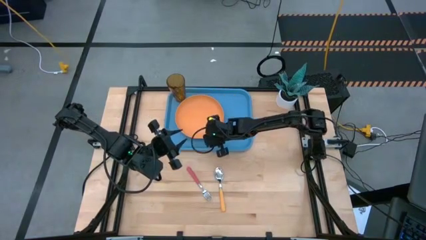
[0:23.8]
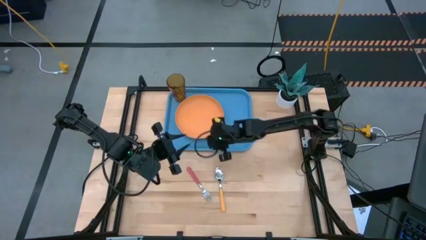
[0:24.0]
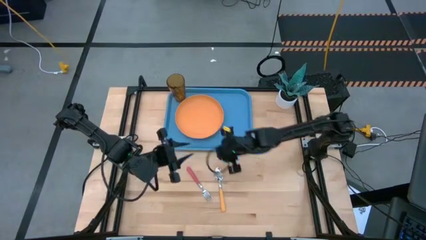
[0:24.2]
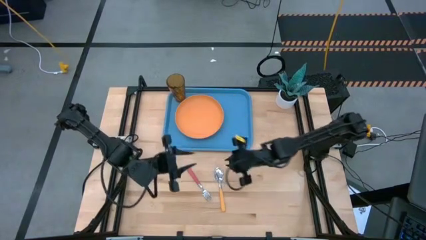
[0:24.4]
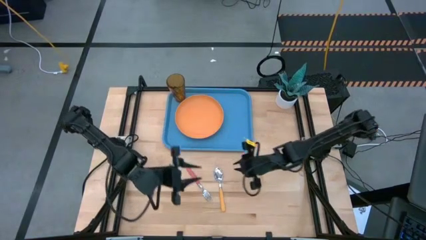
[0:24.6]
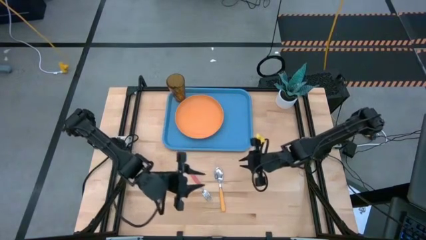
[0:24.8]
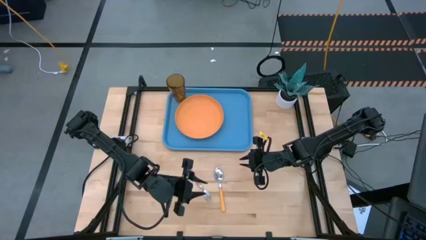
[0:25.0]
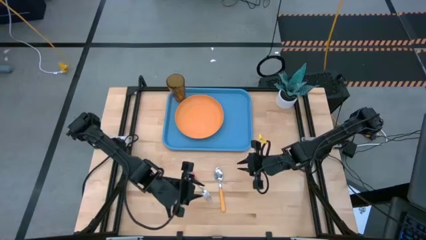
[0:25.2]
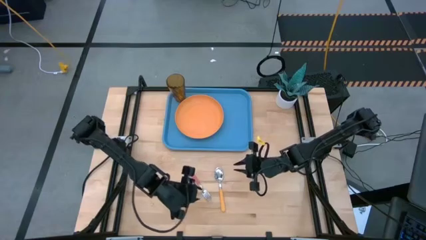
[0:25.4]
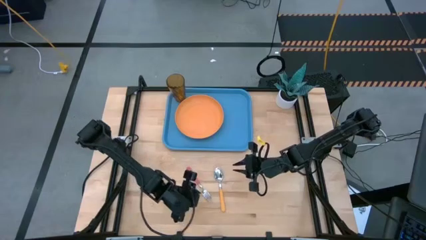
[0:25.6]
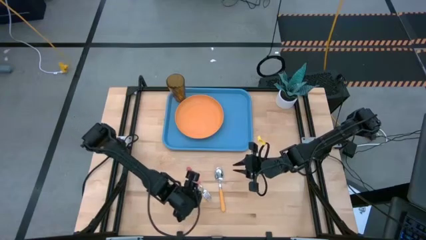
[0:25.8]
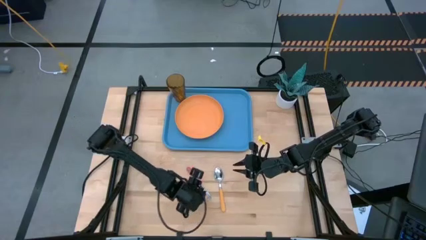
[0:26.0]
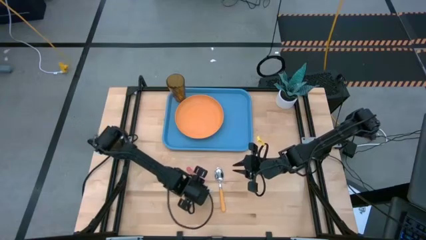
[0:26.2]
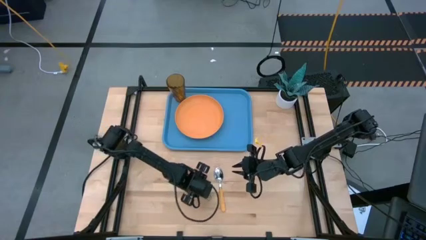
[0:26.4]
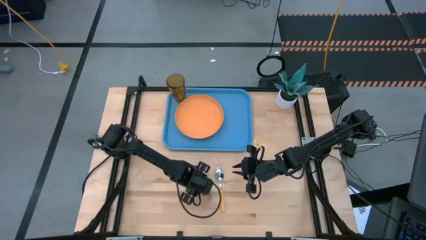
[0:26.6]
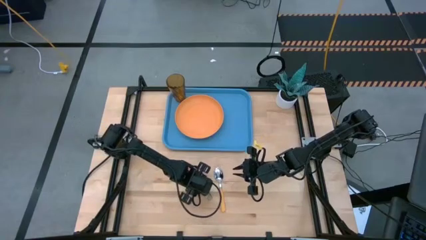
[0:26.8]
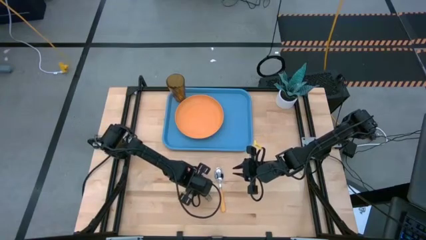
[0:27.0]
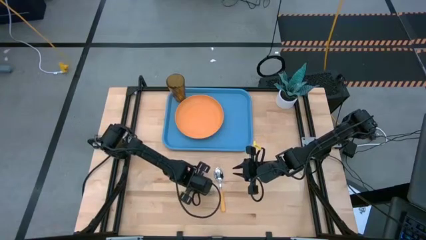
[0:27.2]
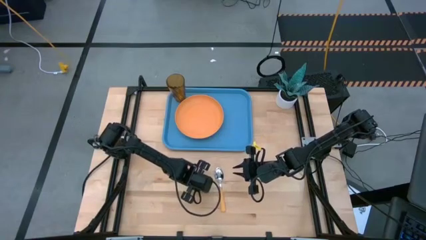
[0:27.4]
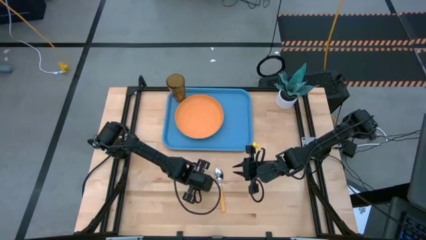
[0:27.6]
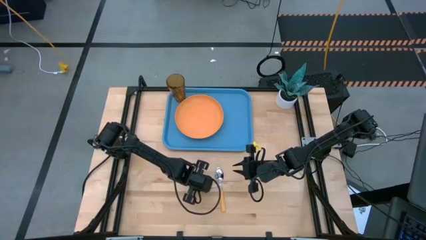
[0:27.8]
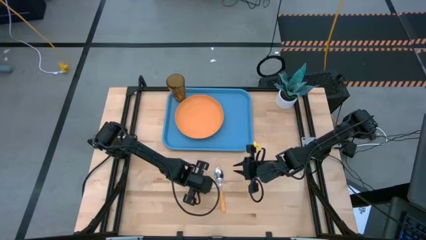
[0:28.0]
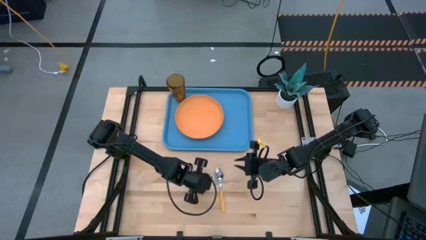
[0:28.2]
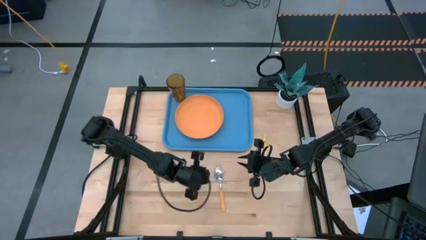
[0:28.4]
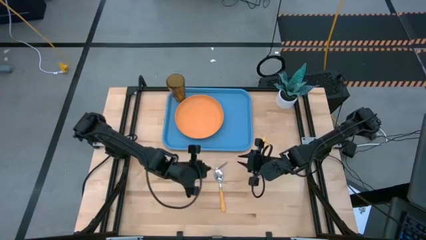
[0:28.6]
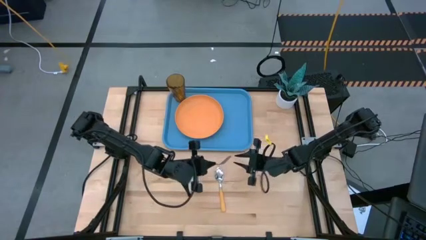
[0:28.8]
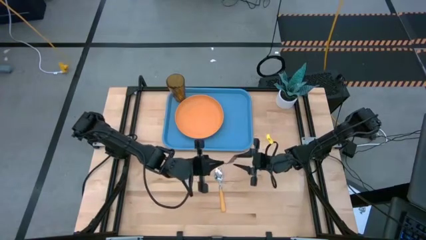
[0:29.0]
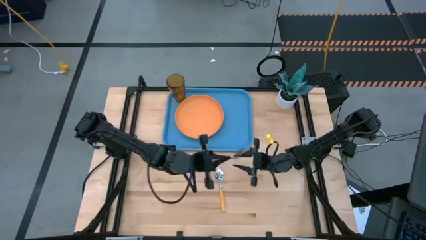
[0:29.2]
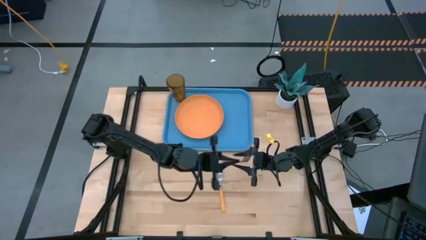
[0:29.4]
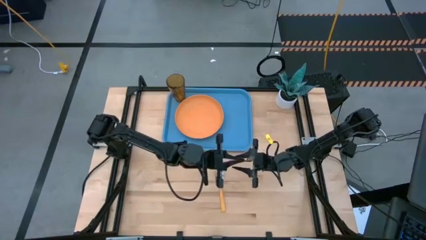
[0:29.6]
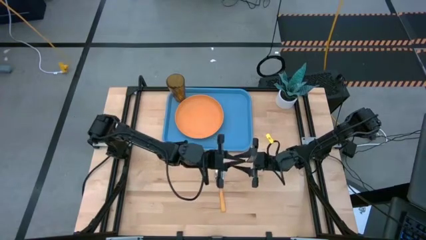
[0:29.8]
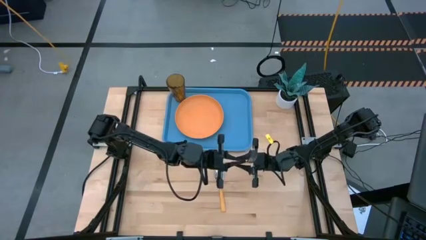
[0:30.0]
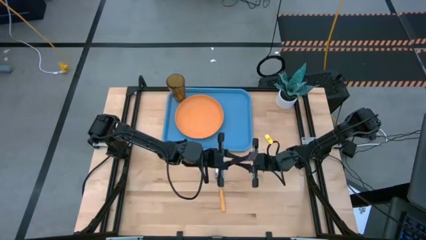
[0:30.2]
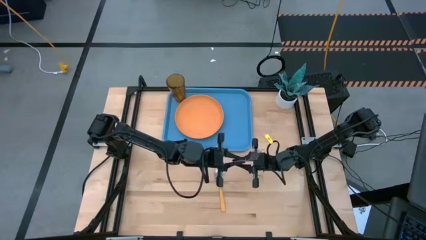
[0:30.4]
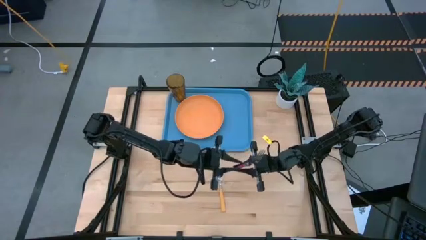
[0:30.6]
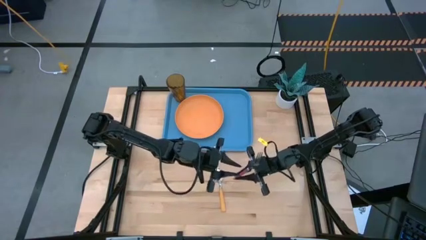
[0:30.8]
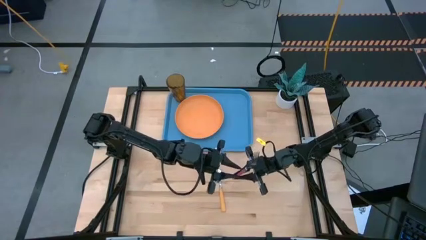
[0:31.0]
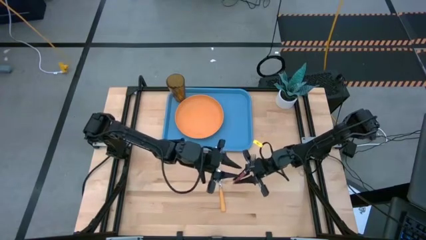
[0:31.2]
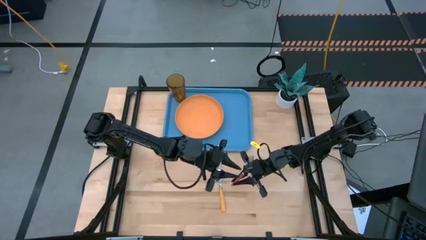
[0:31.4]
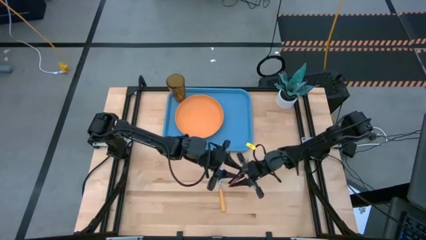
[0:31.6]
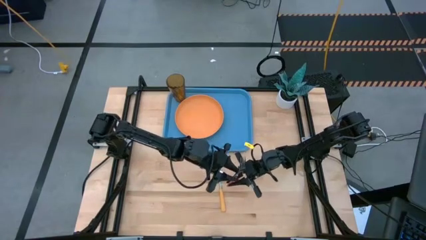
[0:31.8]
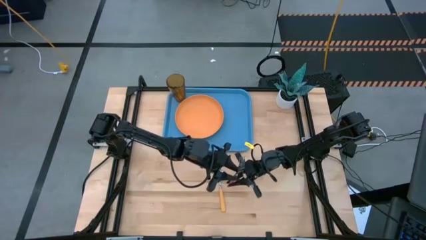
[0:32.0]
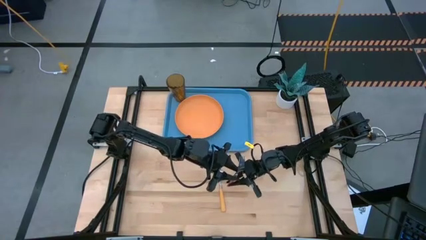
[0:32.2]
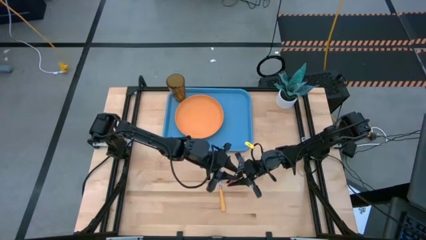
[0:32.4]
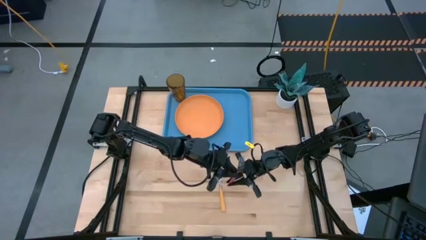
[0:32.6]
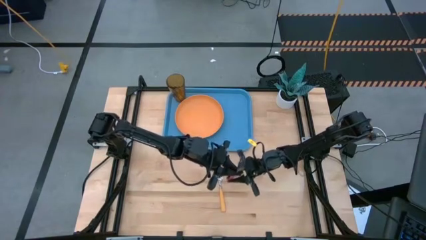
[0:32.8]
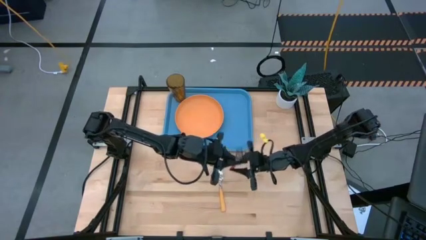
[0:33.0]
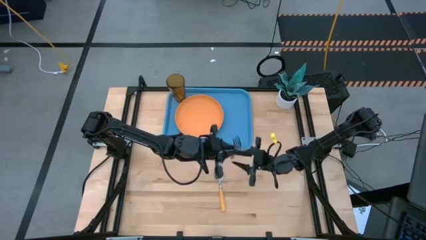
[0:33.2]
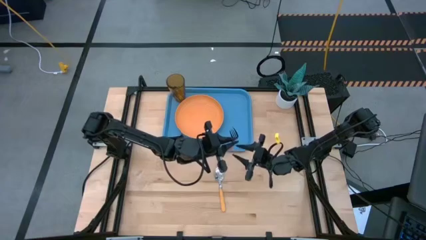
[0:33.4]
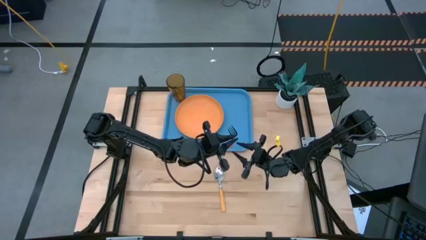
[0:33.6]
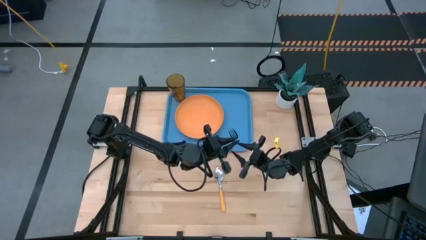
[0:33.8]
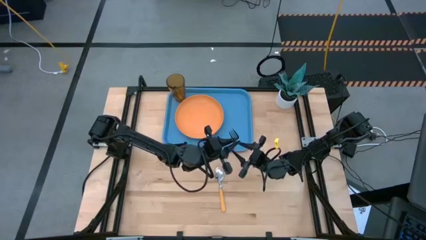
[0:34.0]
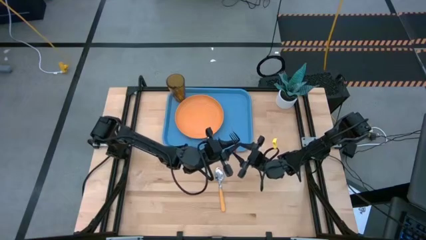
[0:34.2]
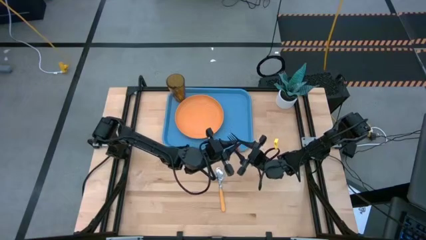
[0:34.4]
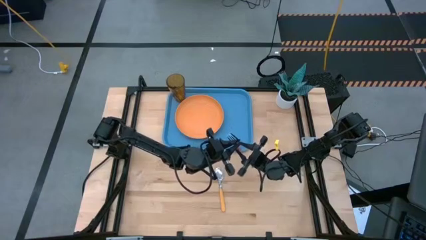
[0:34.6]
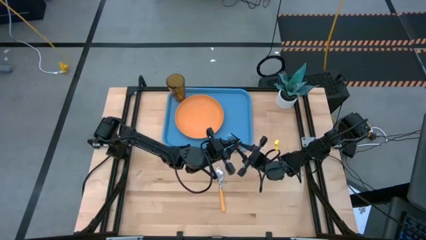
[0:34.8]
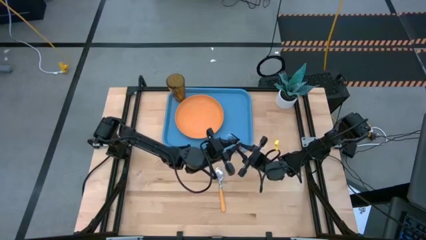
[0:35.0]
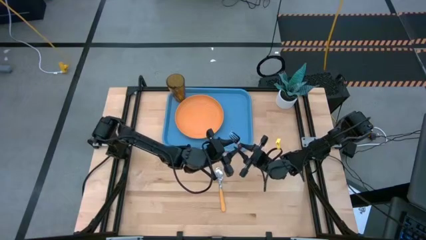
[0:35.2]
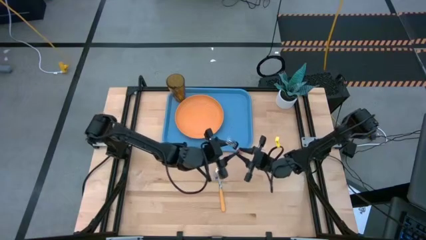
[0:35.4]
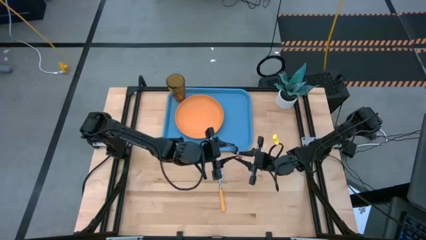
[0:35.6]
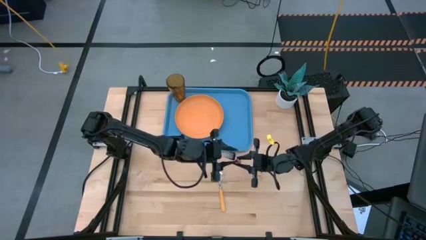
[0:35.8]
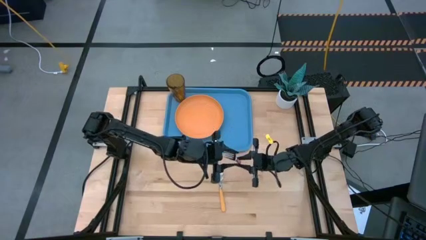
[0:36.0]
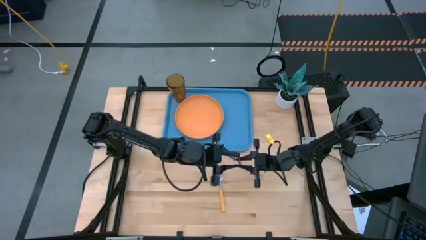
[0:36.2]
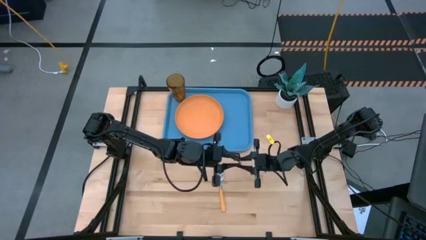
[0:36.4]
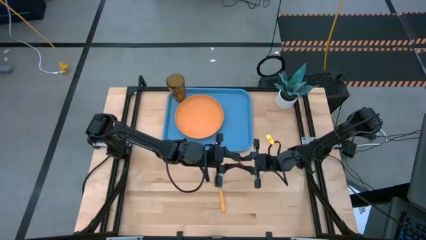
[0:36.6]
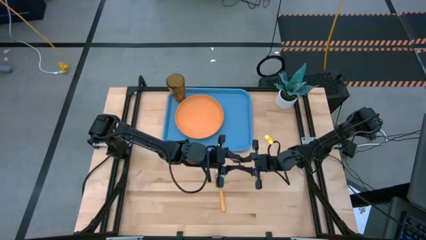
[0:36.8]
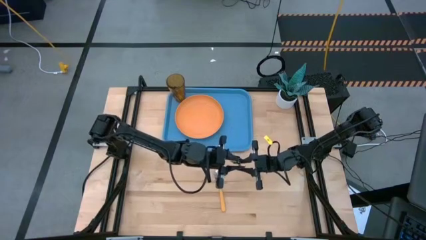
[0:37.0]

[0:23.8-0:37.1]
Task: Pick and place plate/cup/fork/spoon on tray
Put the pink fork on the right side of the orange plate
